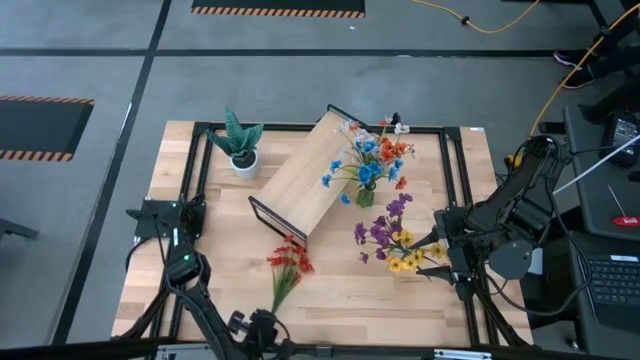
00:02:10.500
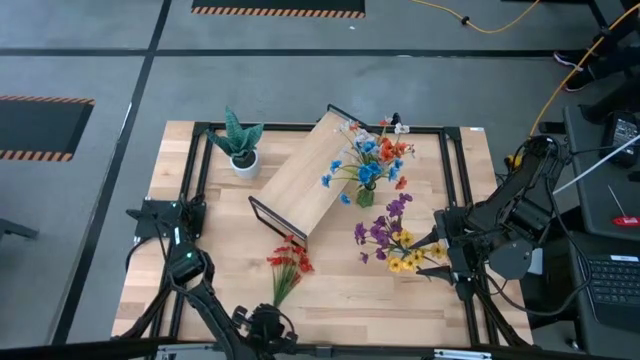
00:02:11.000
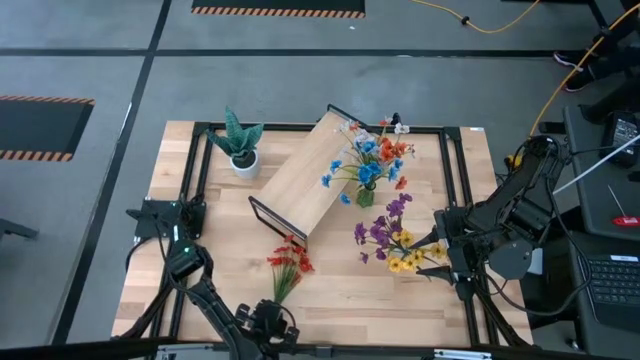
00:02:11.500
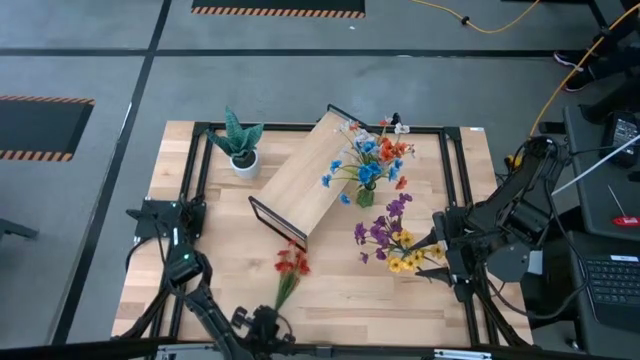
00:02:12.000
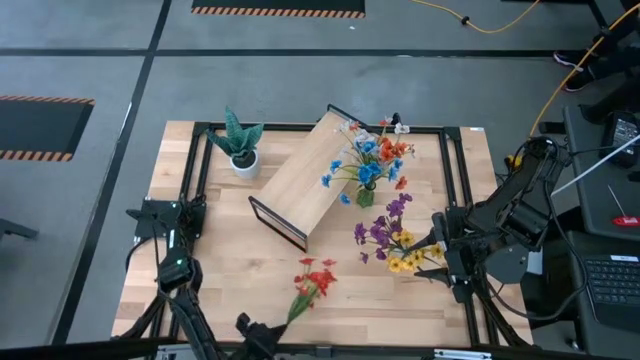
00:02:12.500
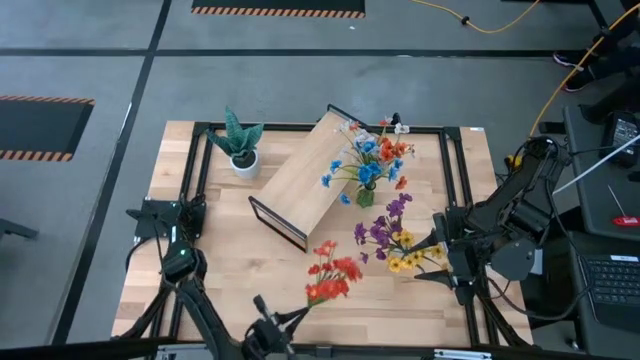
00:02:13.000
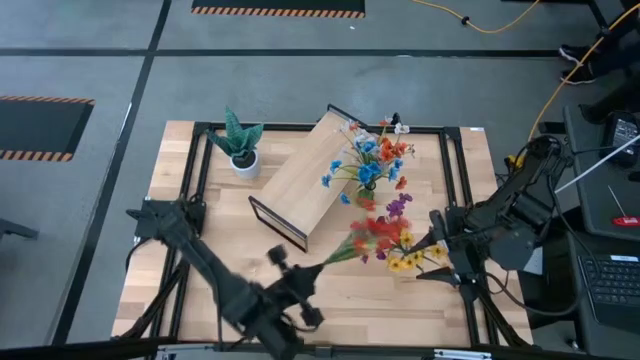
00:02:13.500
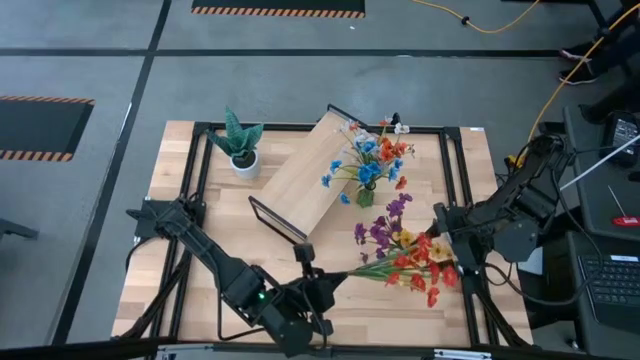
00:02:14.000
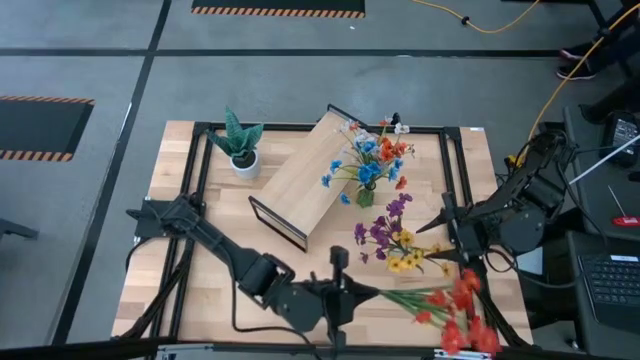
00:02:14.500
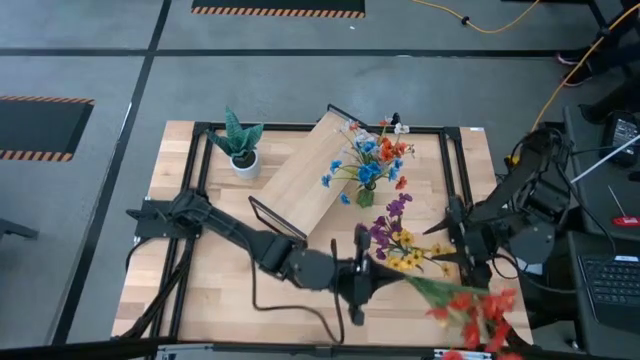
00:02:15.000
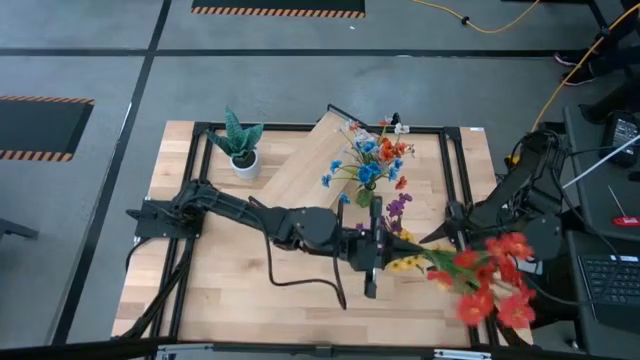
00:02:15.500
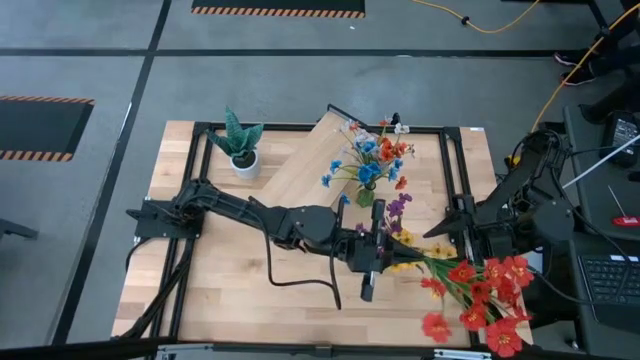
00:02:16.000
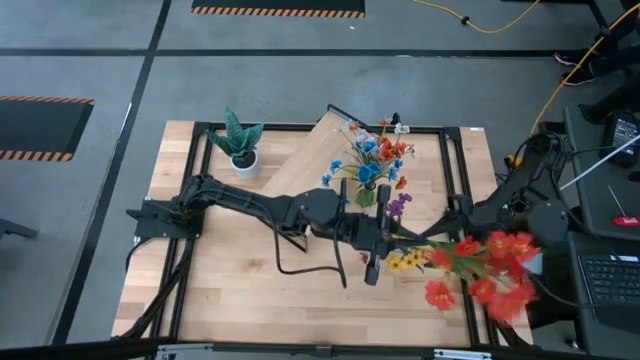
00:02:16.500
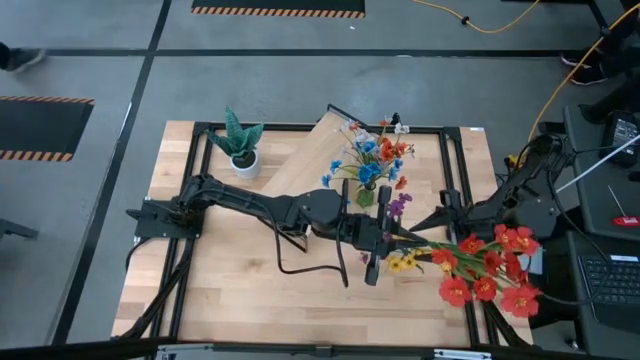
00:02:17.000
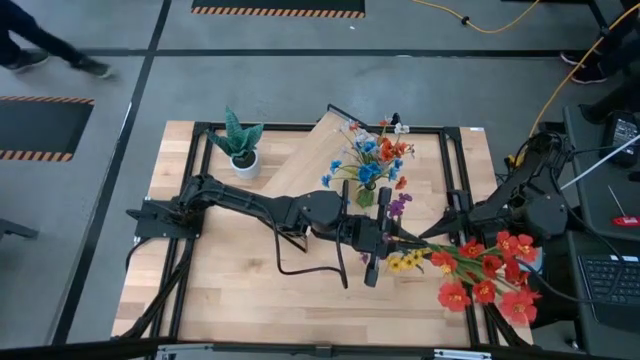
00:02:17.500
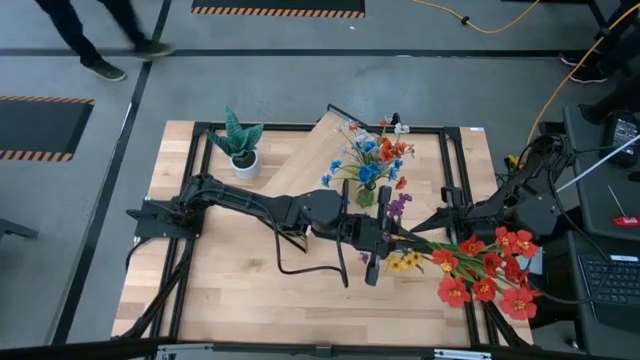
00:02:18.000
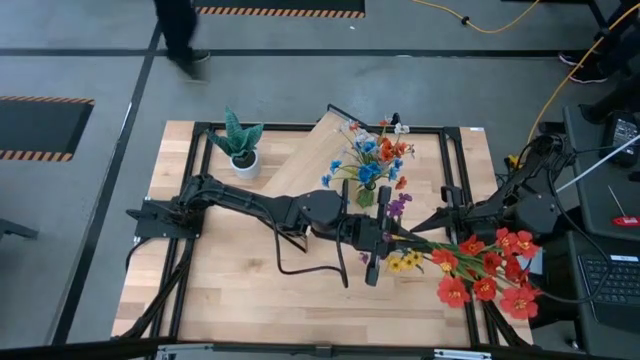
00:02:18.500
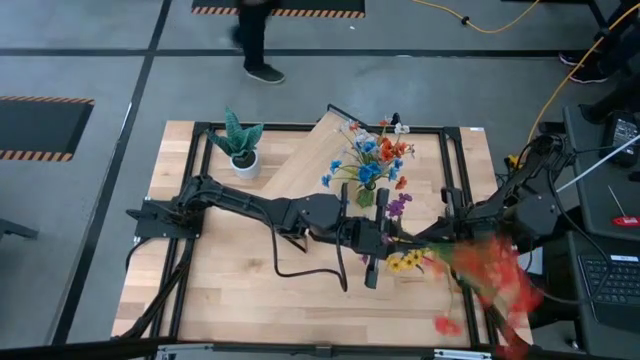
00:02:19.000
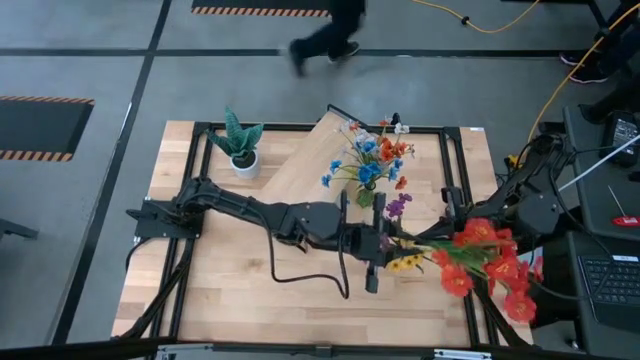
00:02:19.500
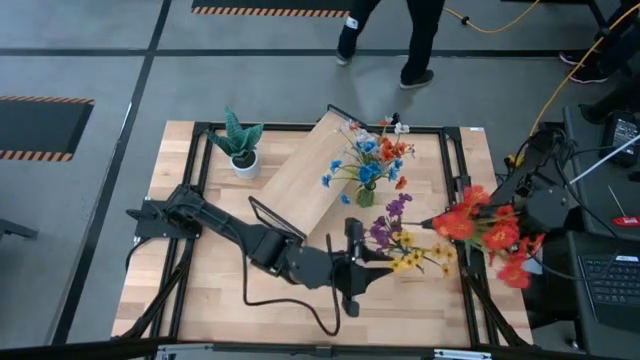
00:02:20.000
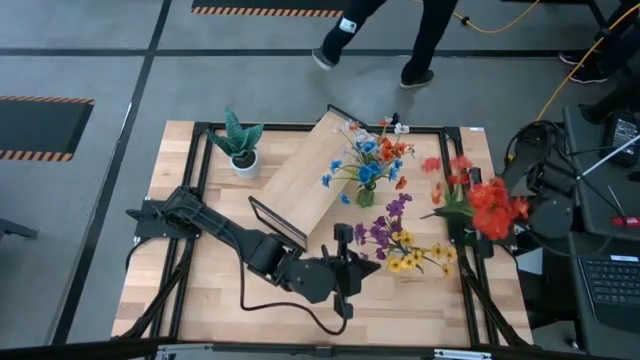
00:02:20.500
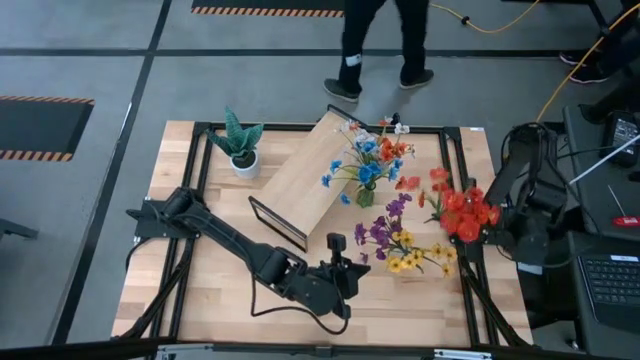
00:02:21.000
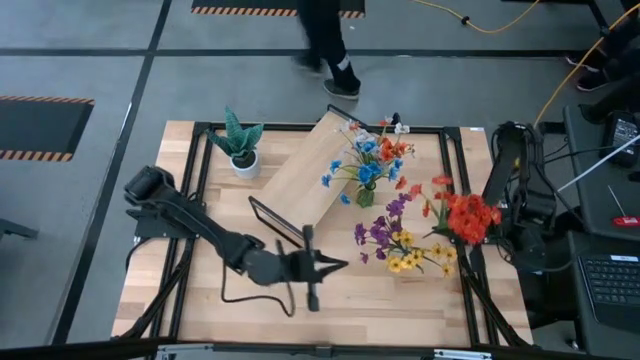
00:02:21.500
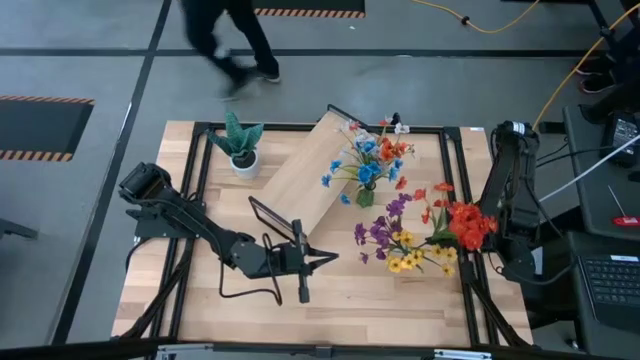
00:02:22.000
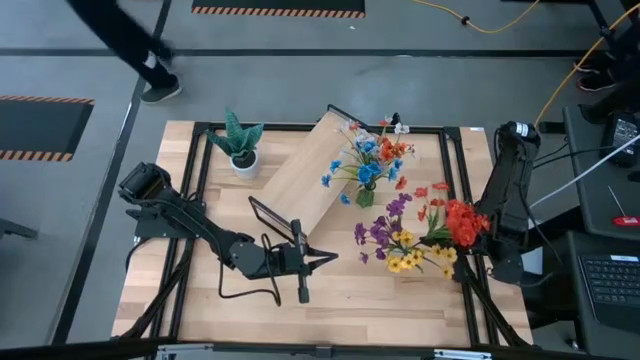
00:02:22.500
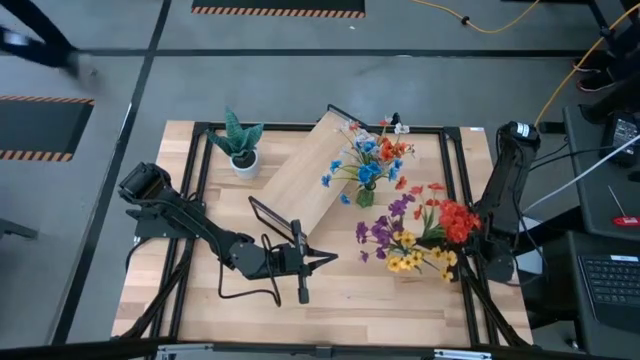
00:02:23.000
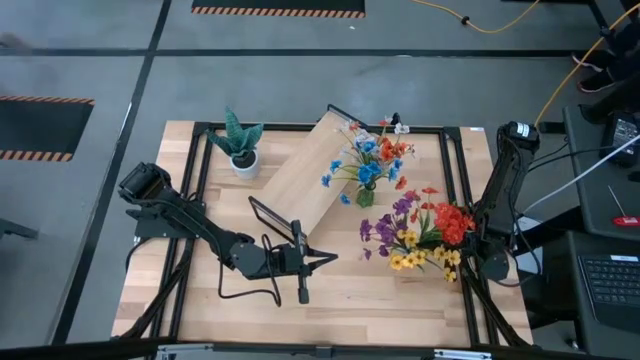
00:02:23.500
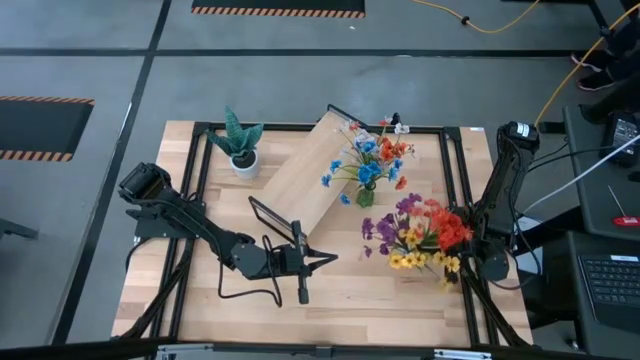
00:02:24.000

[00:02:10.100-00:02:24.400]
Task: Pick and place flowers into a vace then onto a shelf
Put the red flowers into the transparent vase

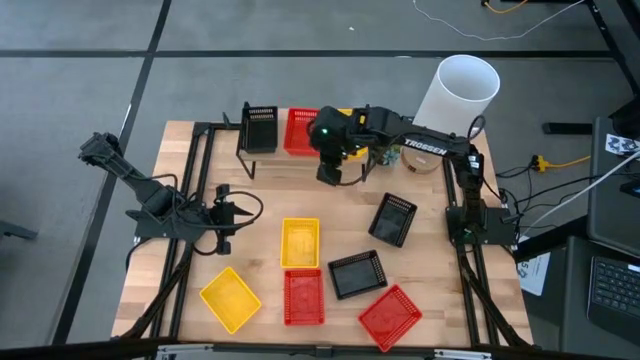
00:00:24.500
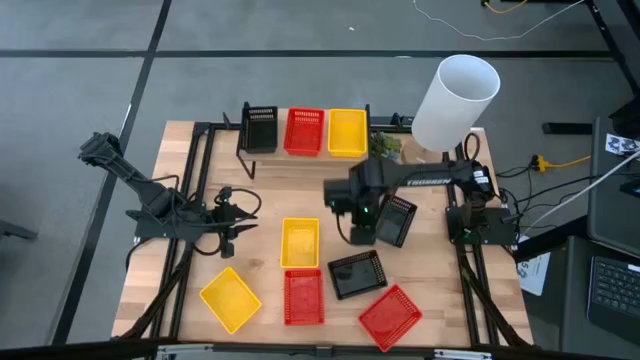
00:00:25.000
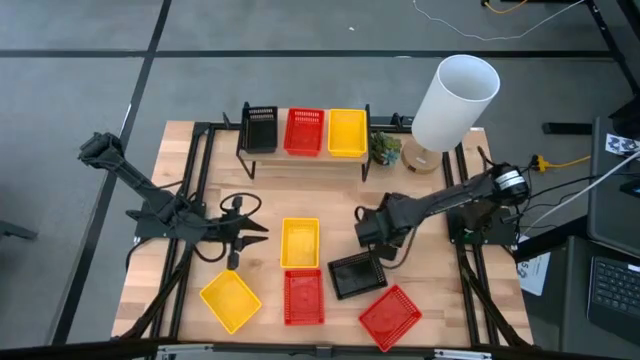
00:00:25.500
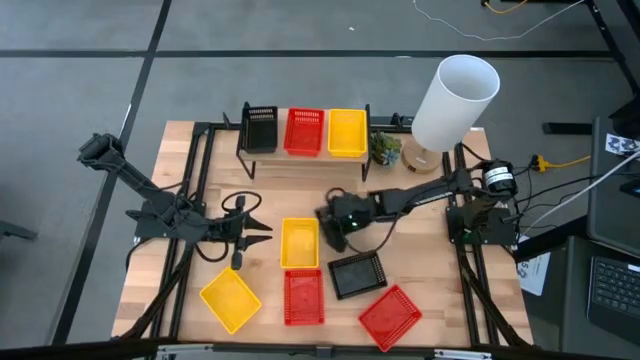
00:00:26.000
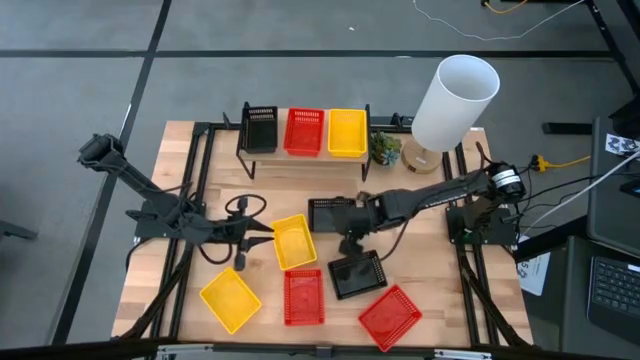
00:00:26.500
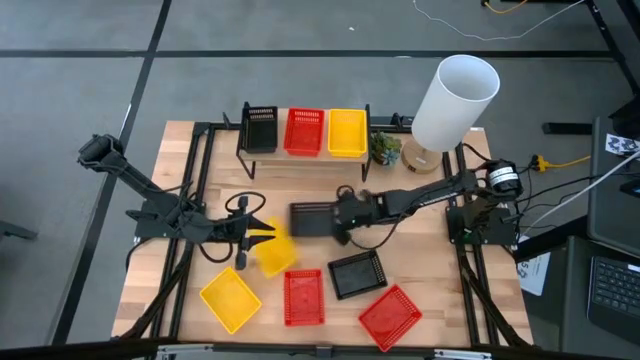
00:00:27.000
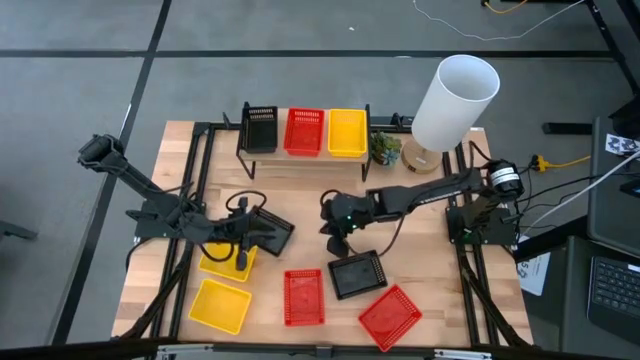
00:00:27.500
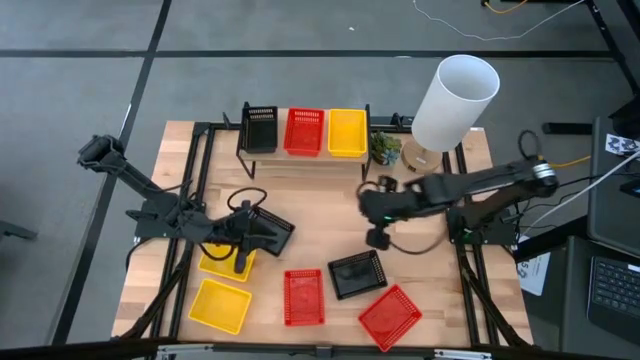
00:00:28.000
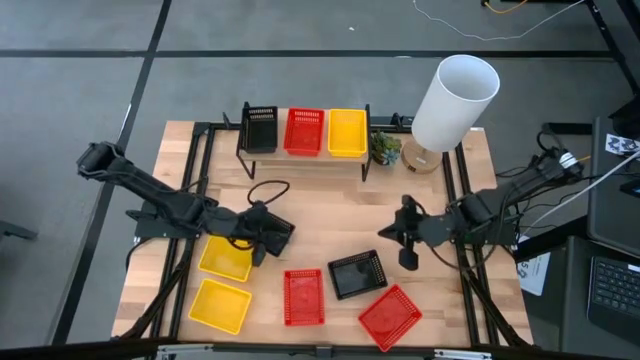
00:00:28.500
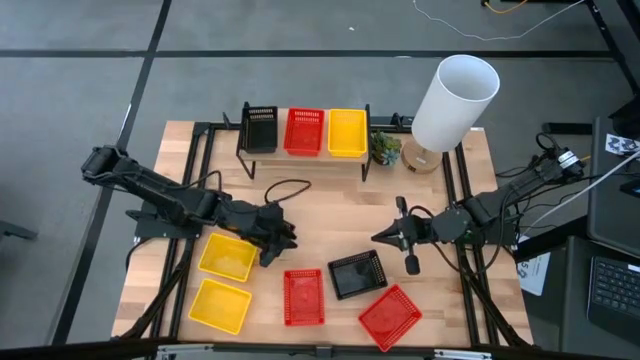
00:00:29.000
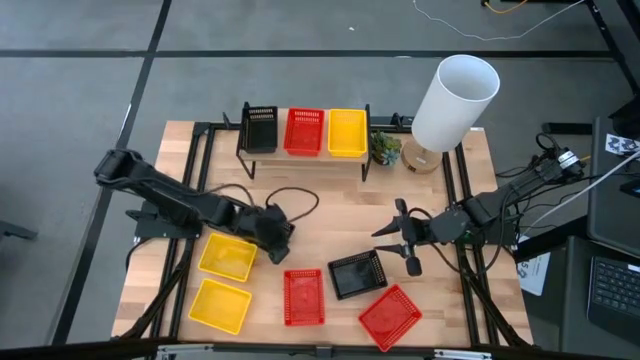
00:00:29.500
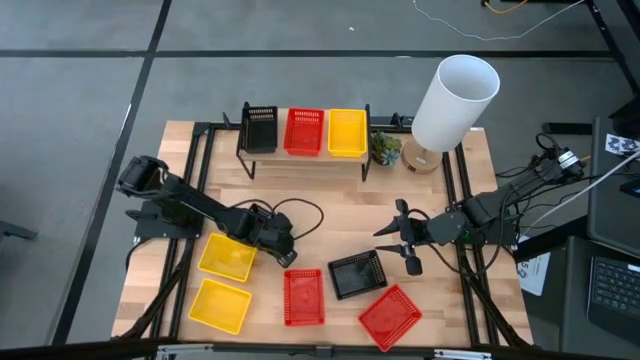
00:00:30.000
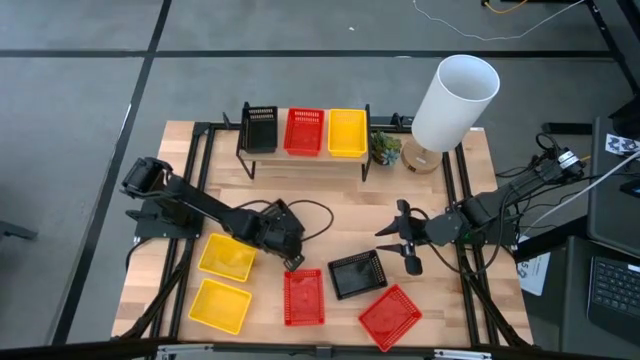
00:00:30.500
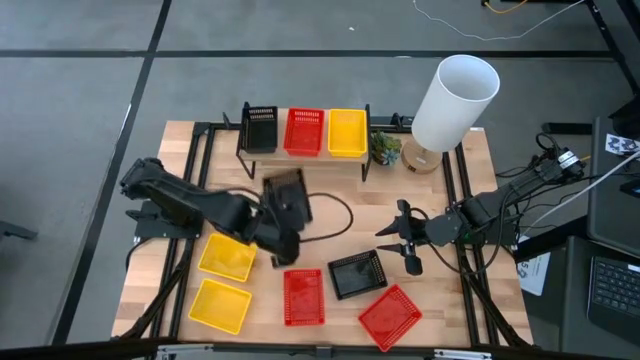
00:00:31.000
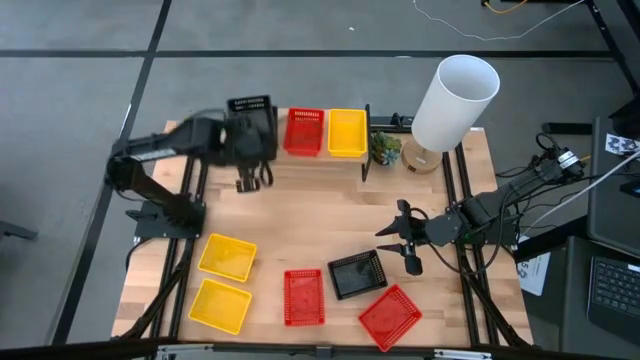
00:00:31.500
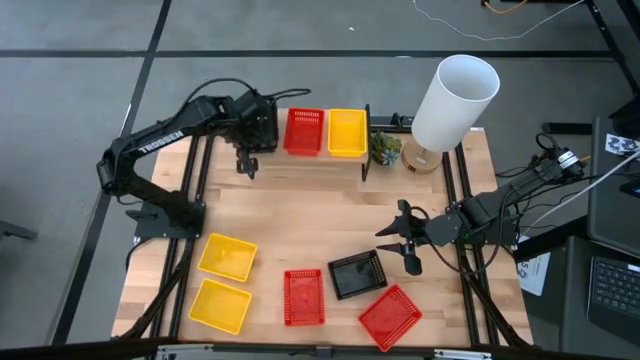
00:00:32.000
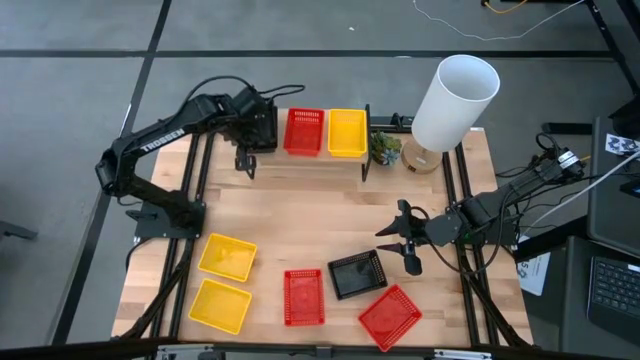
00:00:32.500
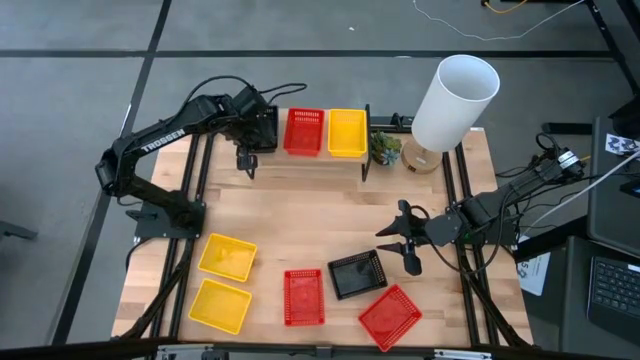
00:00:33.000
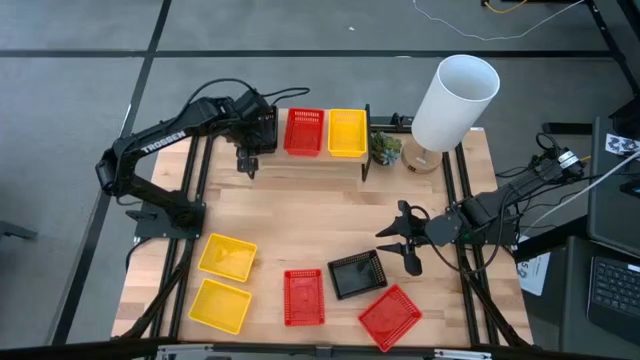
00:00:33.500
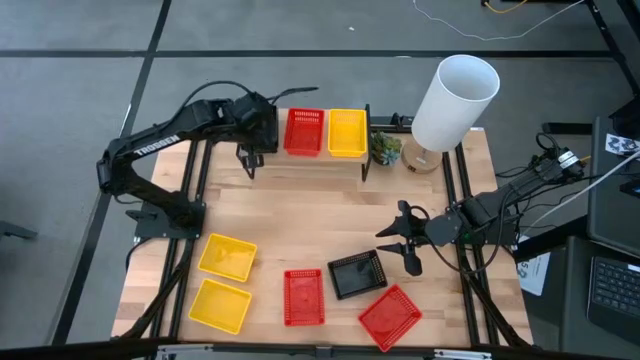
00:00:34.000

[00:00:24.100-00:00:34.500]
Task: Stack baskets on shelf by color
Stack the top black bin on the other black bin on the shelf
